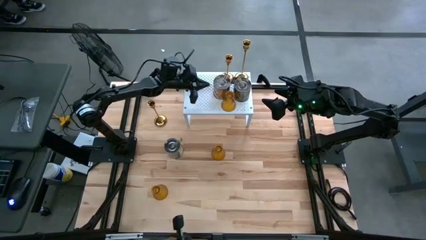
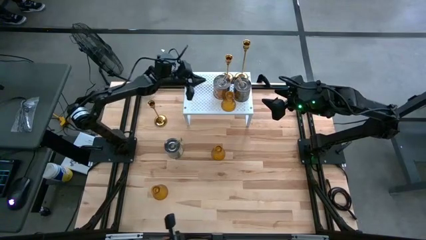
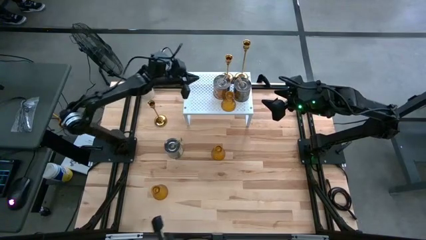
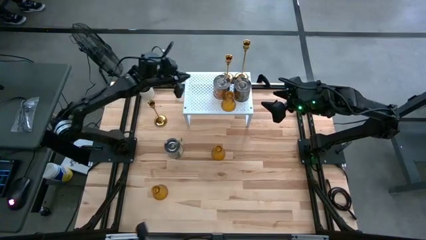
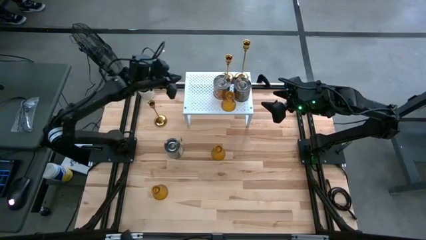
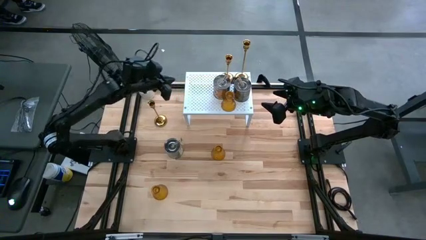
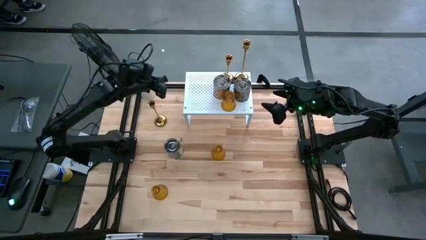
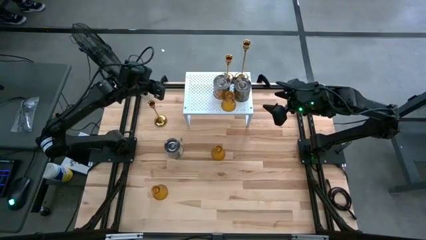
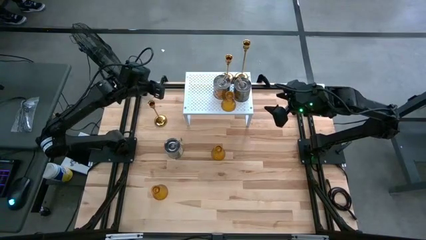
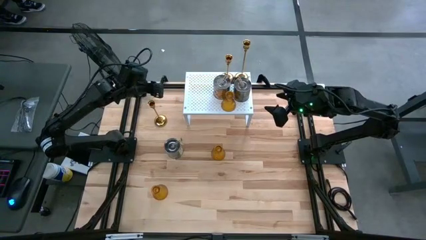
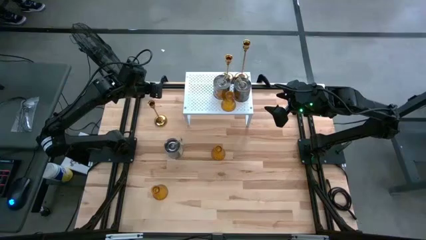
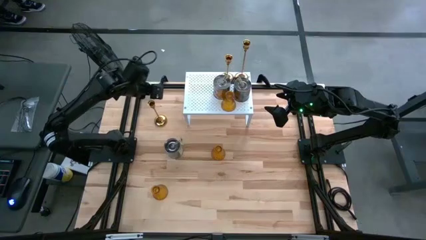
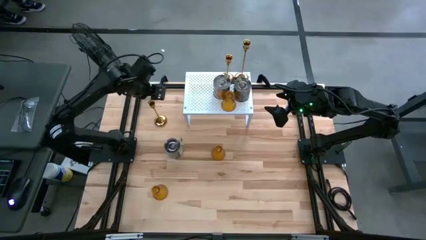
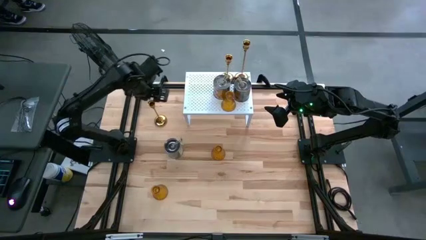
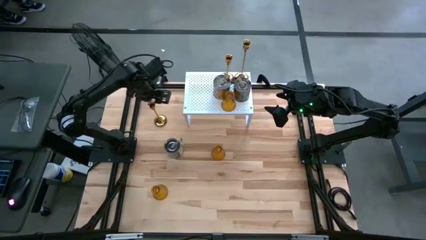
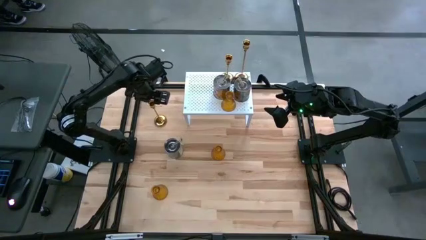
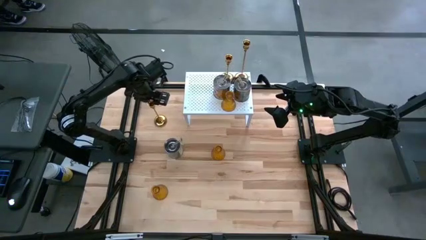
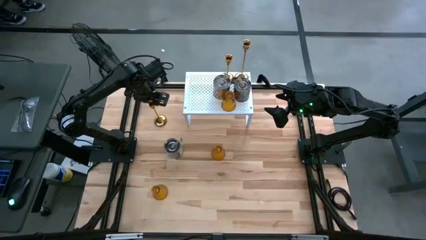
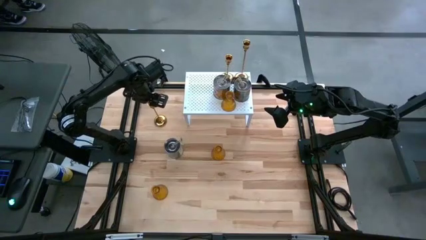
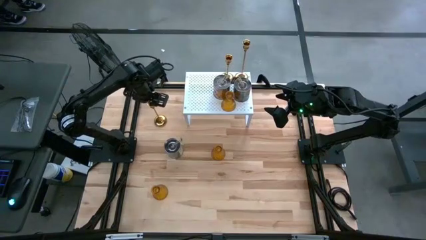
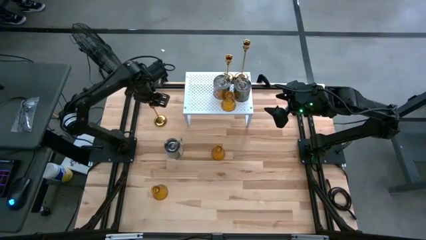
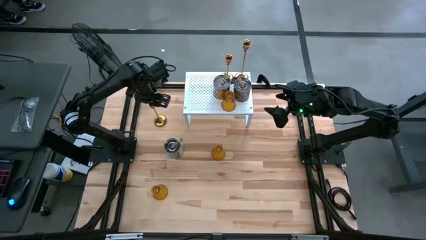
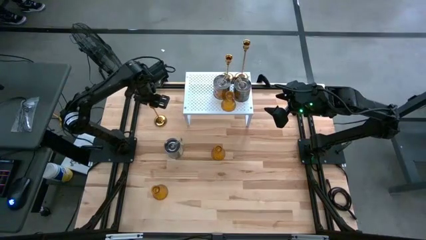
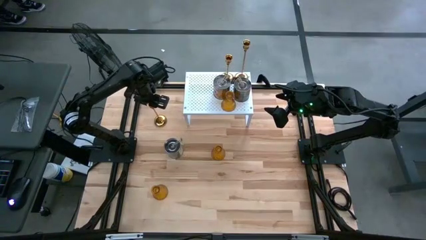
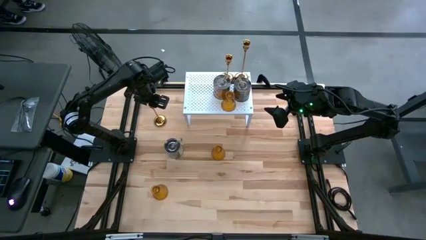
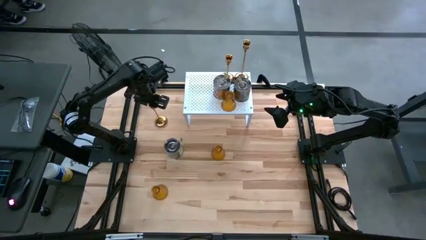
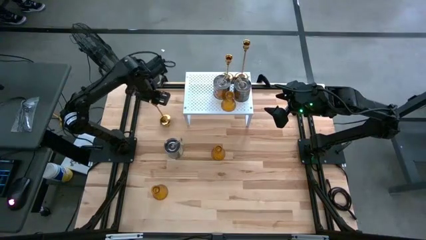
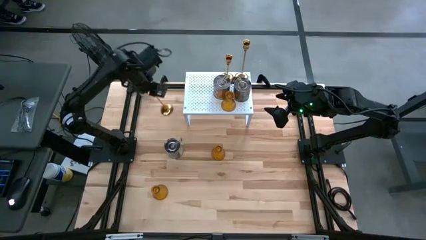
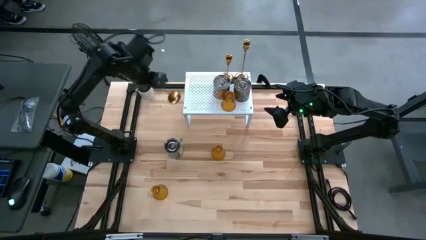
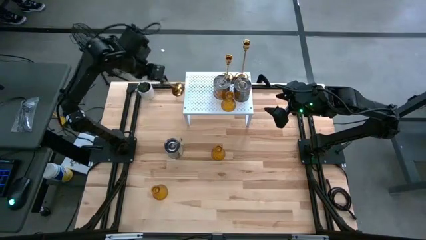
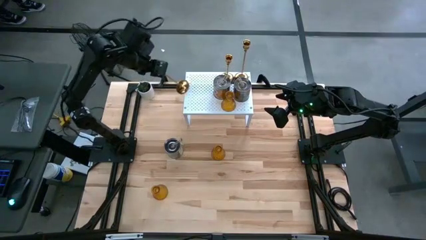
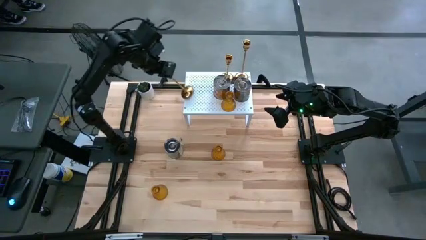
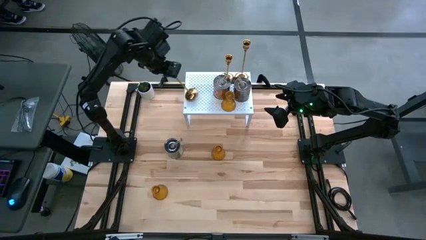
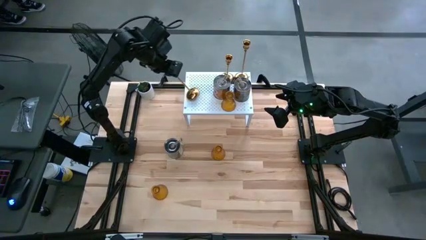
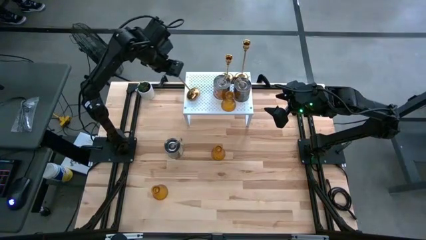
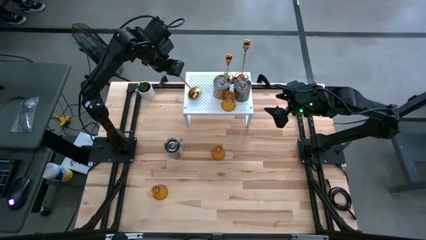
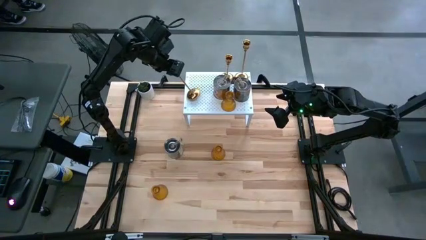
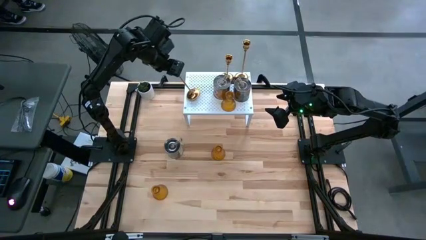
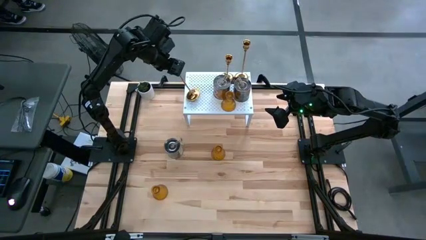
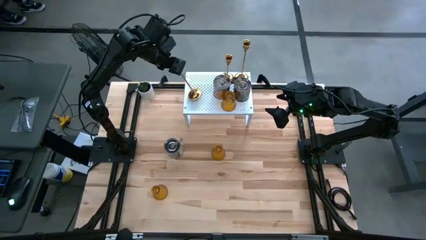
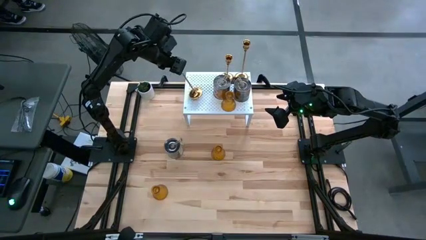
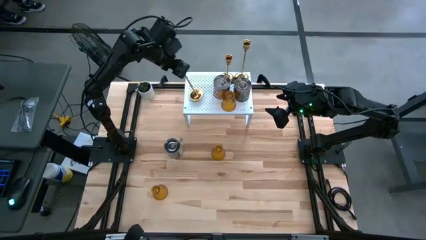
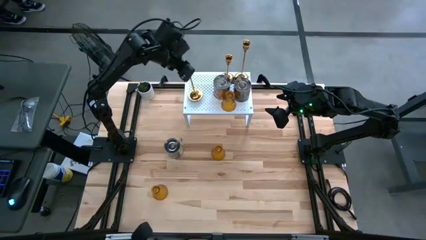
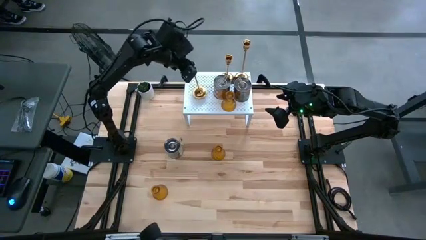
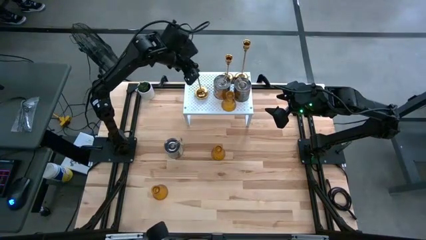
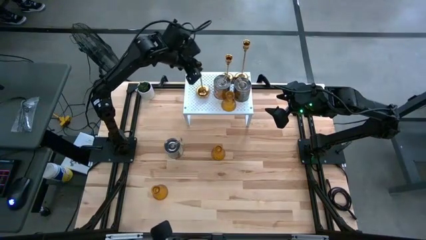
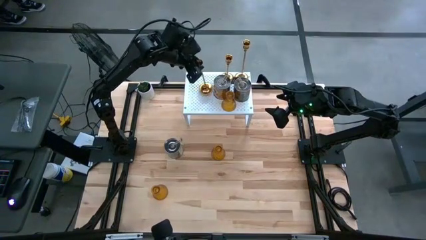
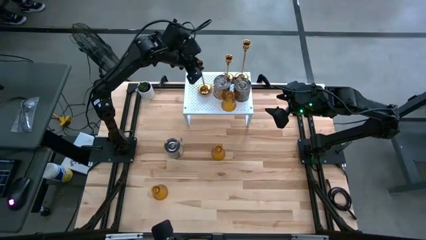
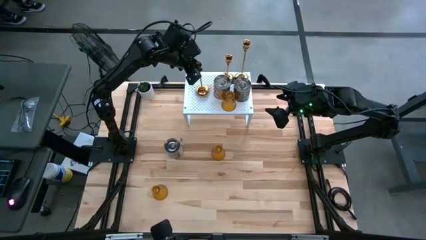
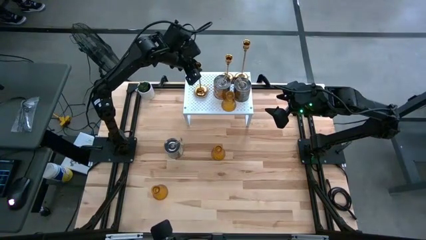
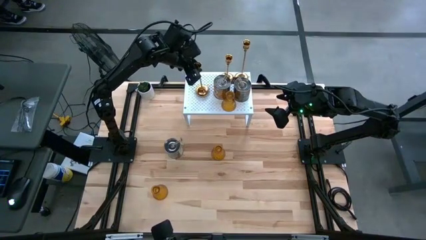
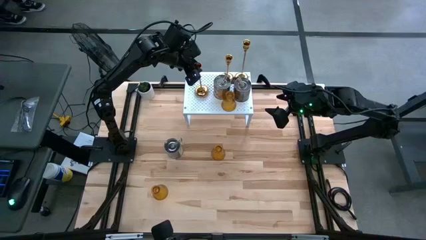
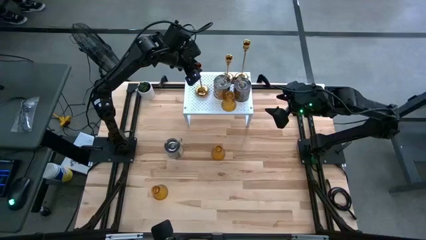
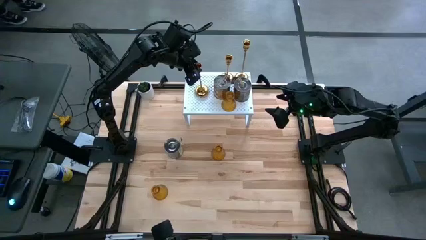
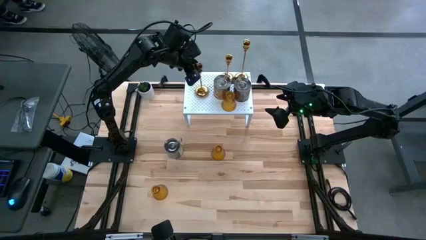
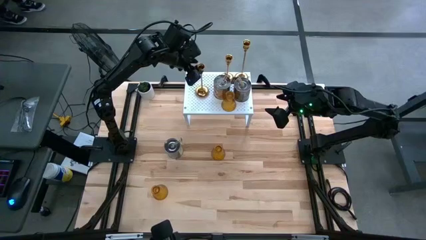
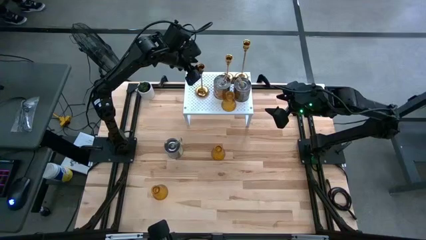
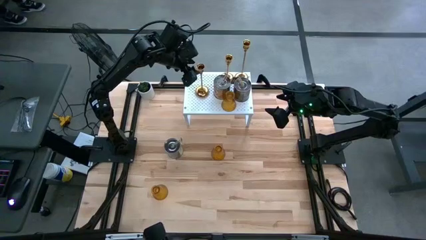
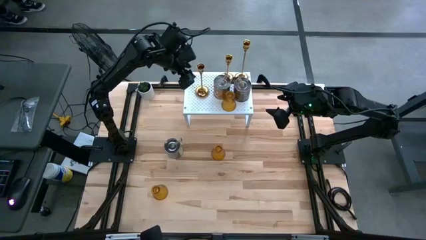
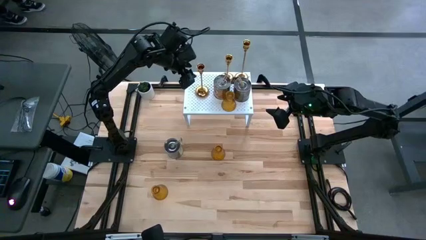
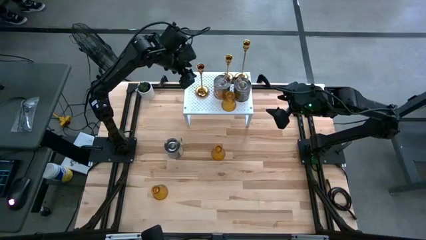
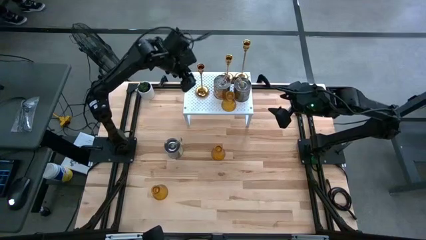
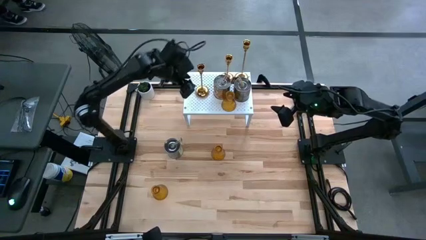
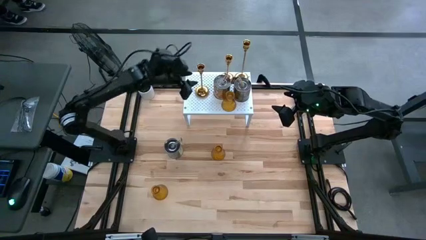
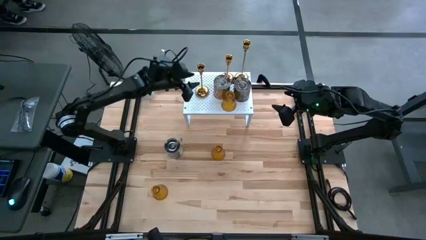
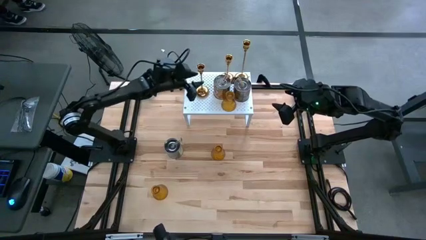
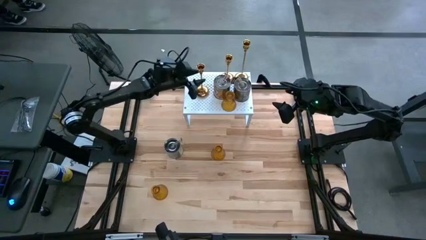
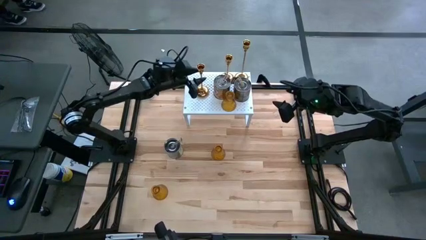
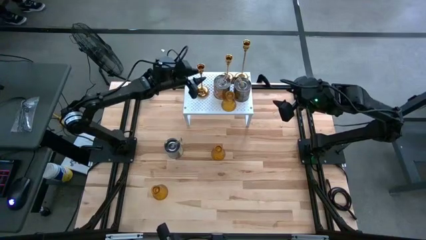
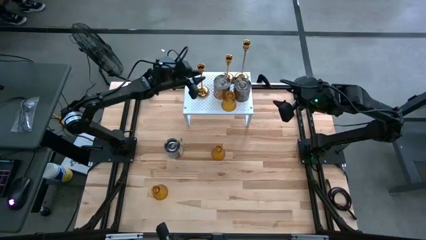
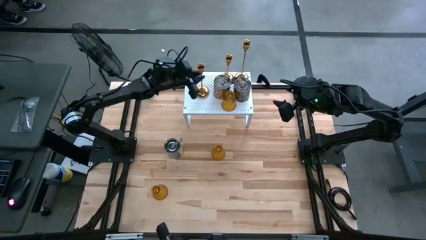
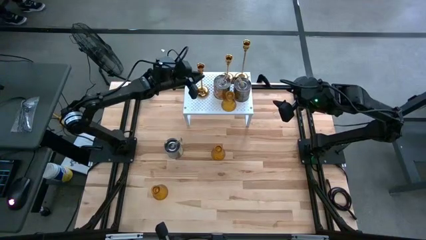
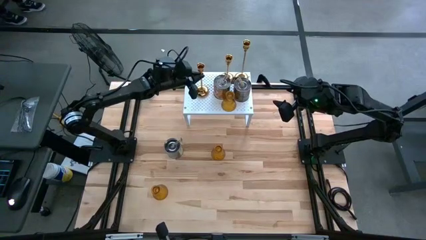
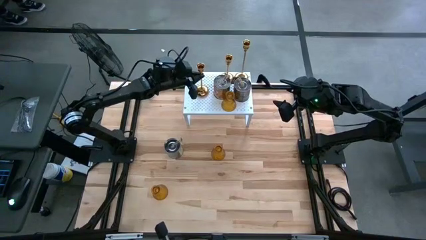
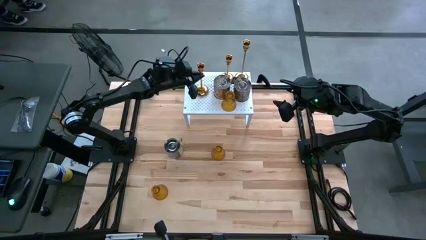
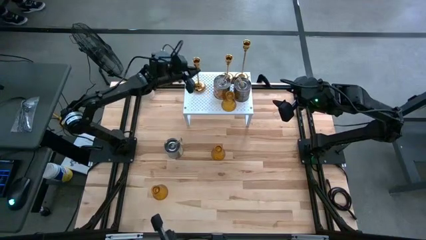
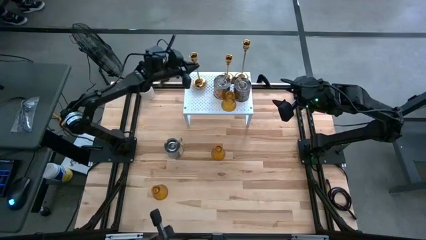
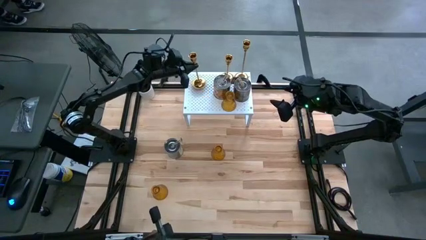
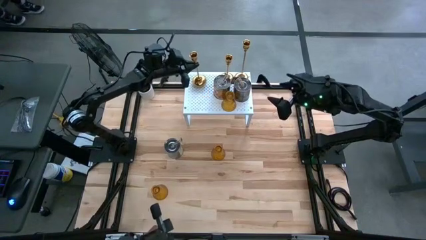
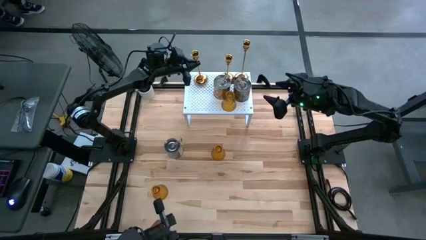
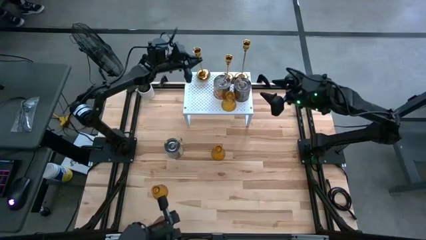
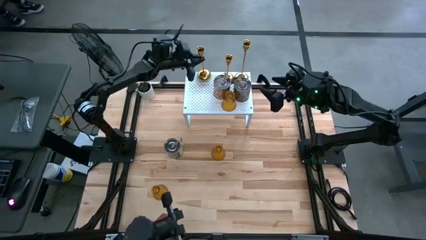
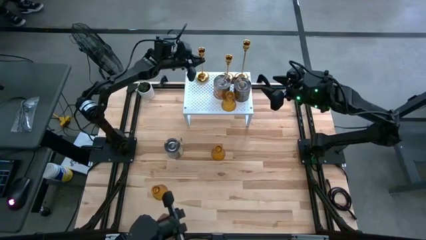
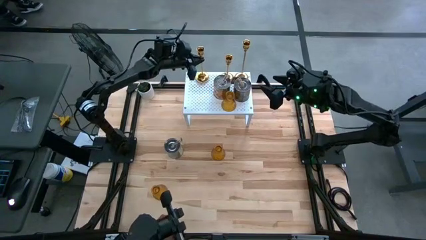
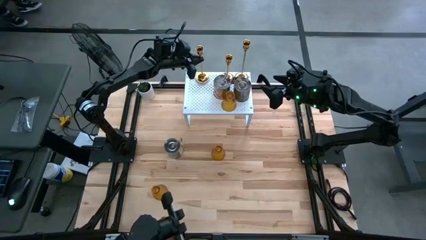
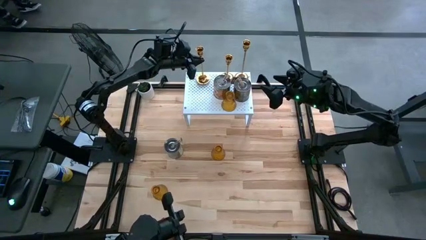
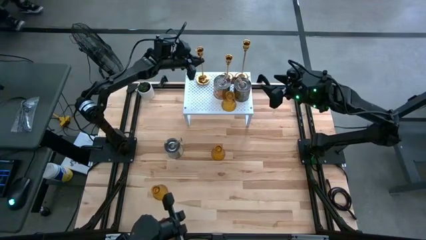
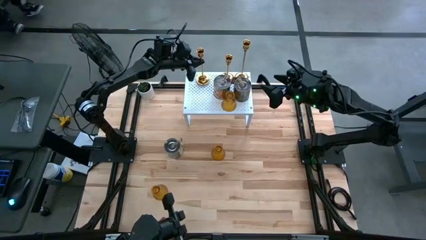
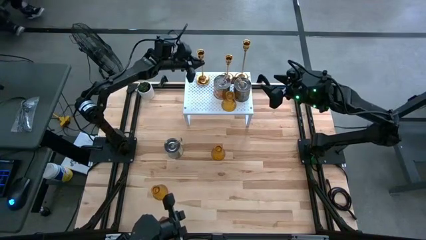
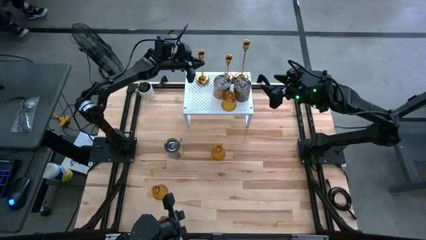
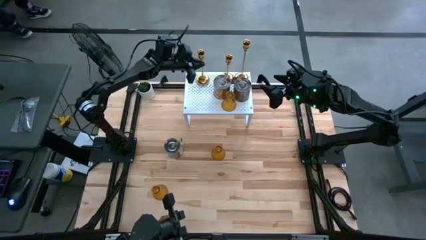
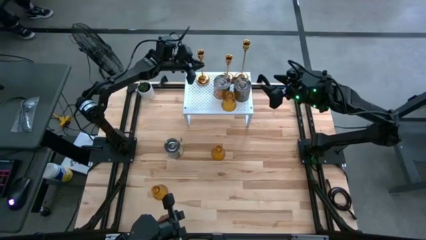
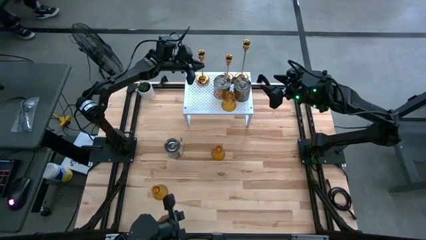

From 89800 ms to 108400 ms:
Task: Pick & Place candle stick holders
Put the gold candle holder on the shelf
